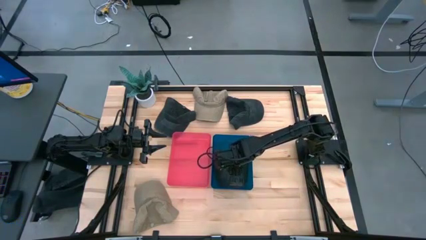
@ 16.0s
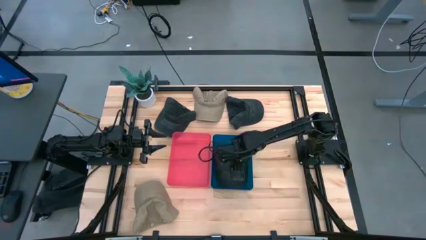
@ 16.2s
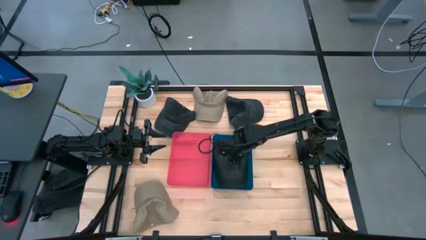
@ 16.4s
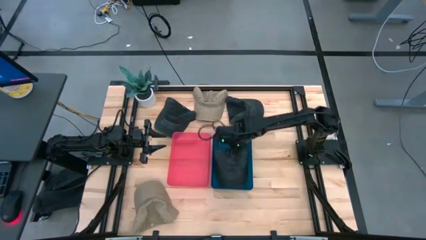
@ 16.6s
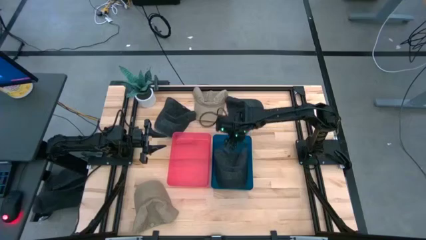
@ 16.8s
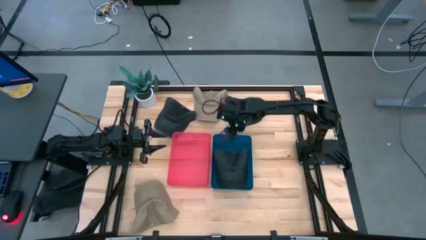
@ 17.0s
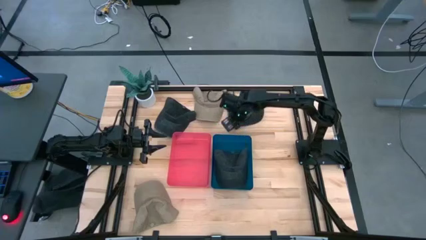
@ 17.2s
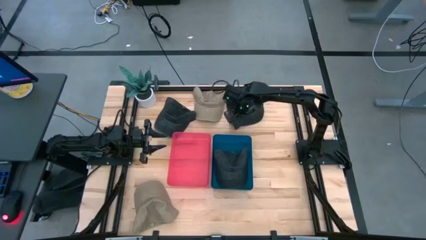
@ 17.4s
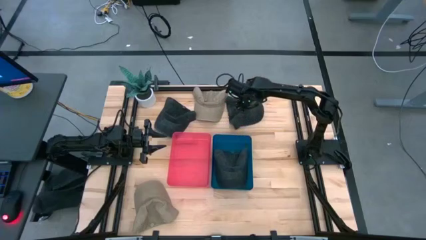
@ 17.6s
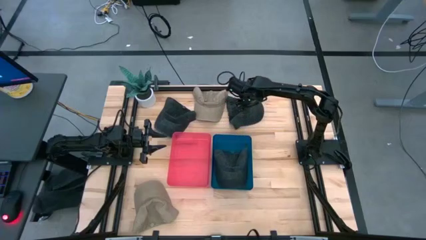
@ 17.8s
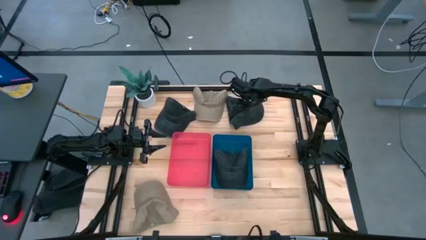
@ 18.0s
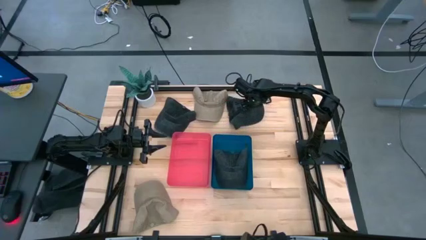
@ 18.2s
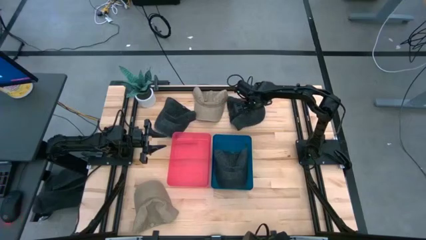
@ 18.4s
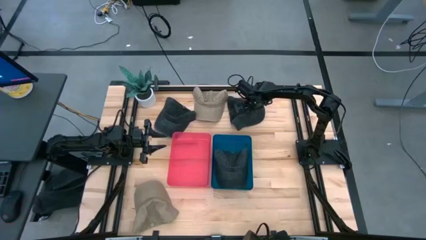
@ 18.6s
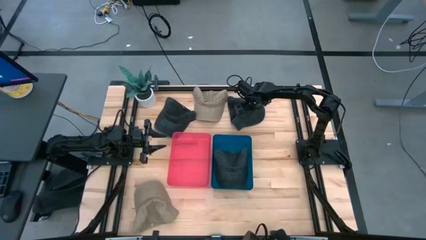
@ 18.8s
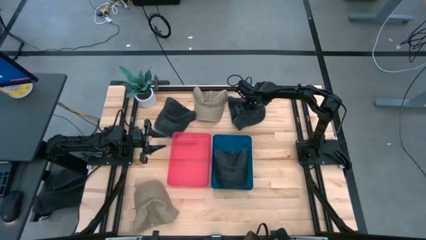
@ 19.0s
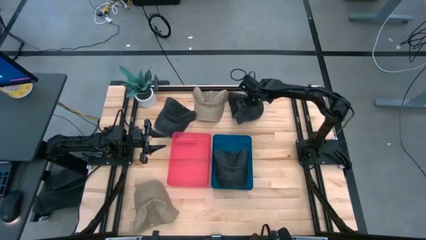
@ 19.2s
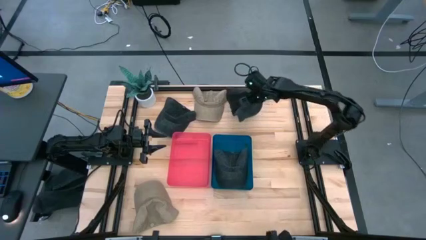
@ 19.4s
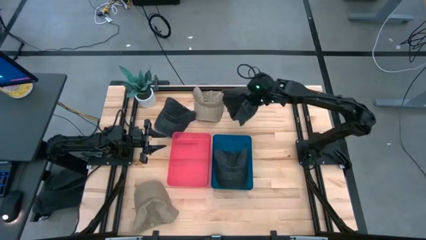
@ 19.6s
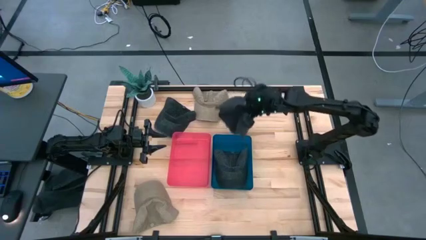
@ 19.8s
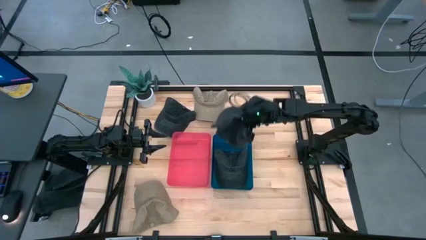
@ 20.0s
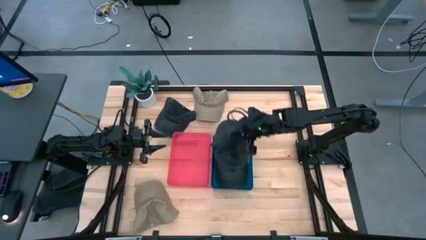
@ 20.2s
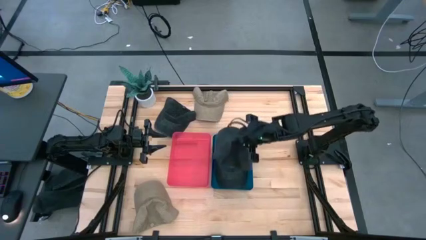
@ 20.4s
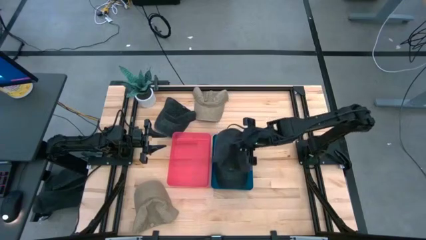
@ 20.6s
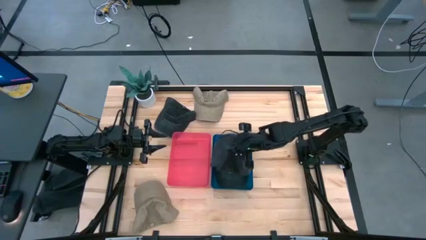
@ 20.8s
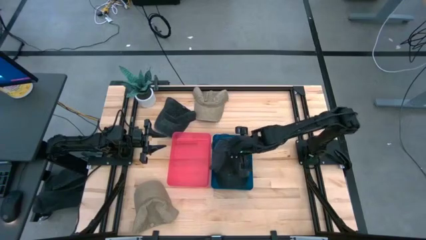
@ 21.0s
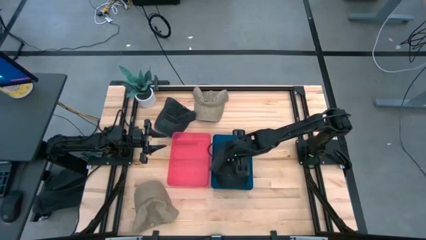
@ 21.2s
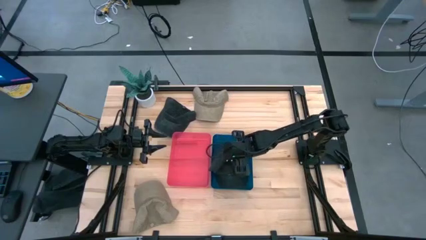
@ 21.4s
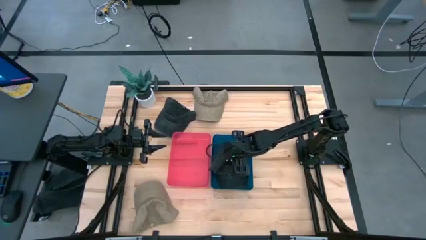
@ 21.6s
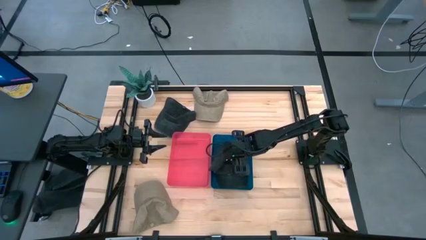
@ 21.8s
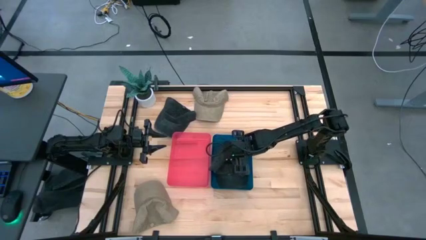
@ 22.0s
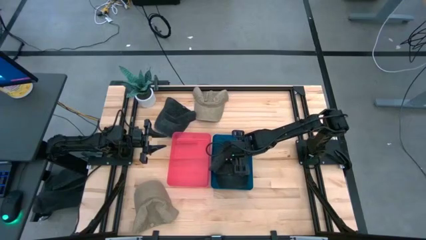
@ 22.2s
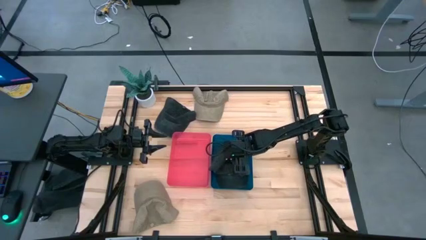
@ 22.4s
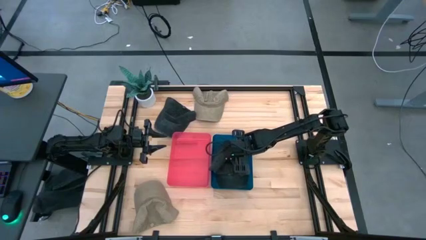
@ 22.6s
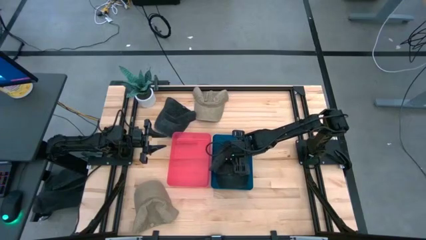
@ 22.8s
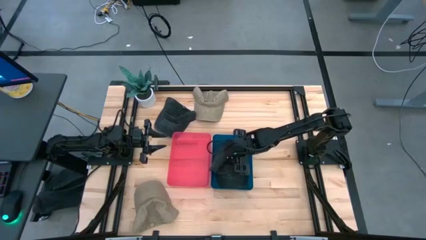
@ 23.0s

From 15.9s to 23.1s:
Task: Pick & Place hat
Put the right black cap into the blue bin

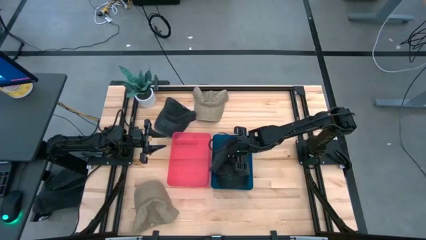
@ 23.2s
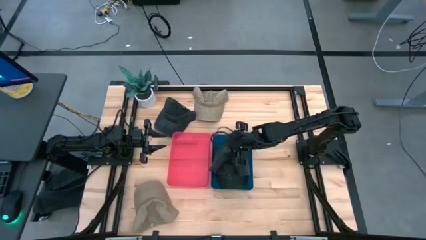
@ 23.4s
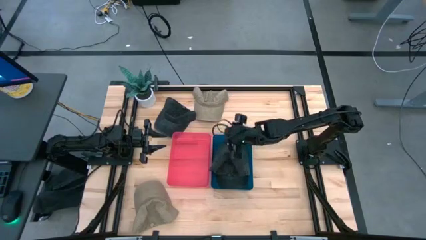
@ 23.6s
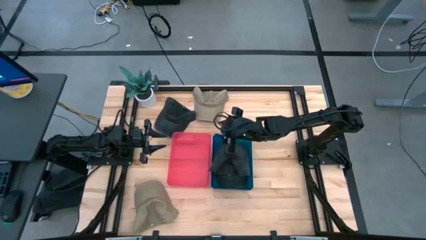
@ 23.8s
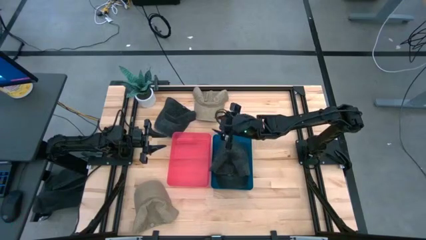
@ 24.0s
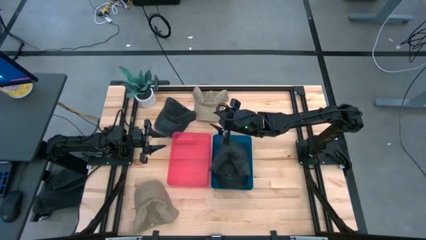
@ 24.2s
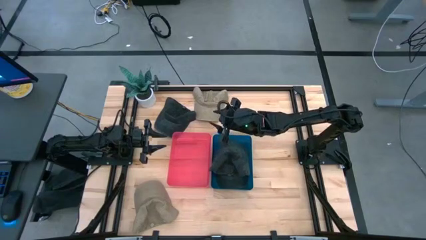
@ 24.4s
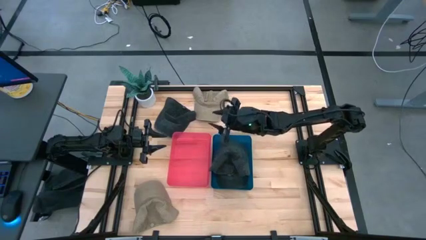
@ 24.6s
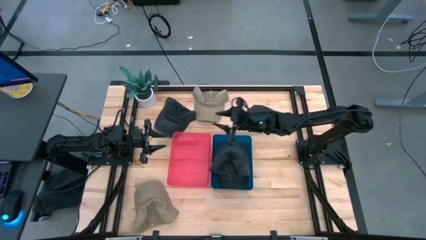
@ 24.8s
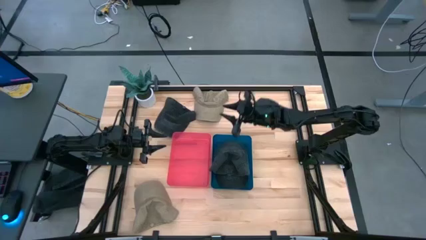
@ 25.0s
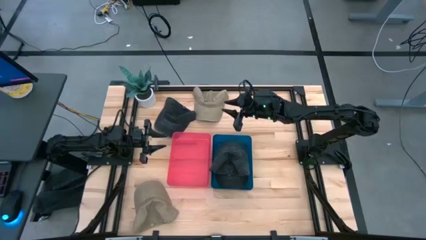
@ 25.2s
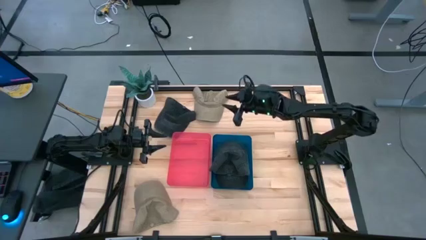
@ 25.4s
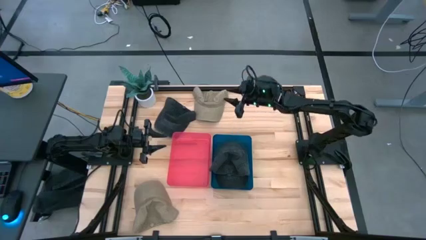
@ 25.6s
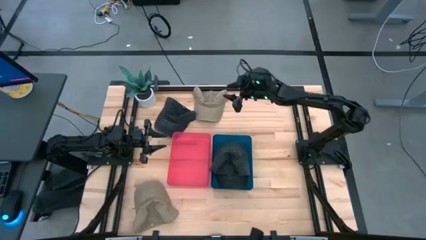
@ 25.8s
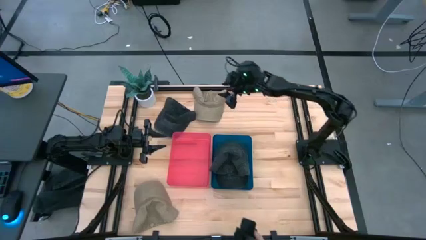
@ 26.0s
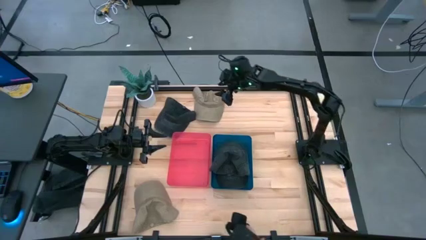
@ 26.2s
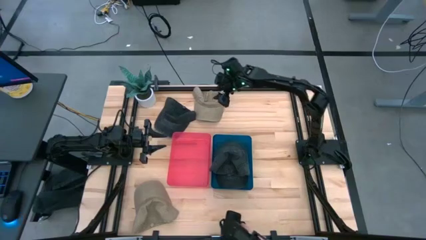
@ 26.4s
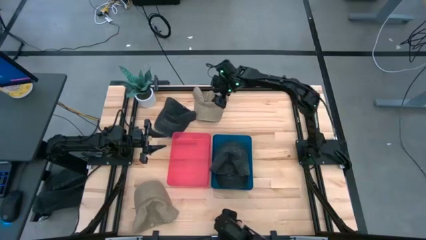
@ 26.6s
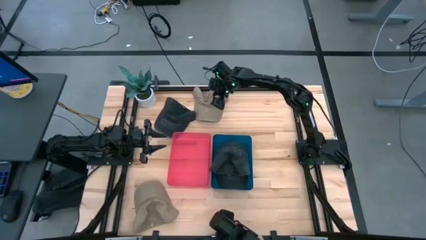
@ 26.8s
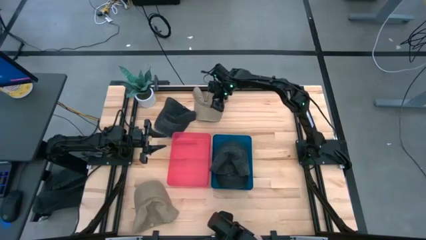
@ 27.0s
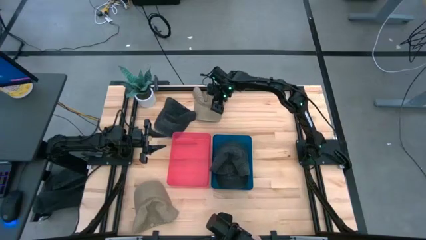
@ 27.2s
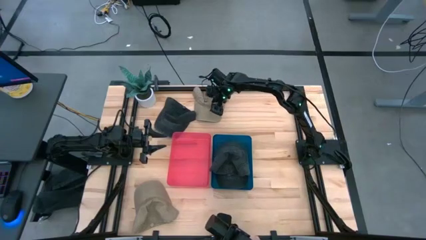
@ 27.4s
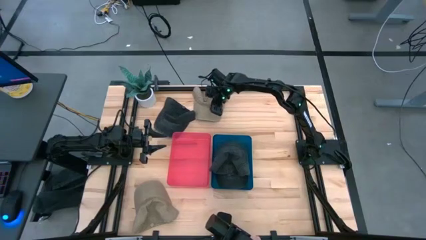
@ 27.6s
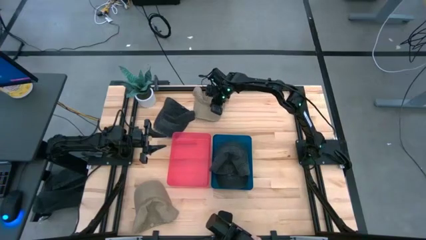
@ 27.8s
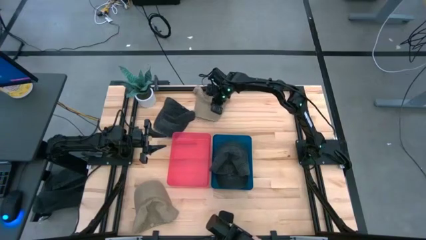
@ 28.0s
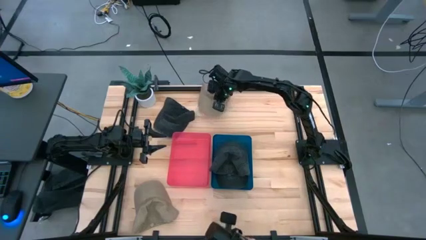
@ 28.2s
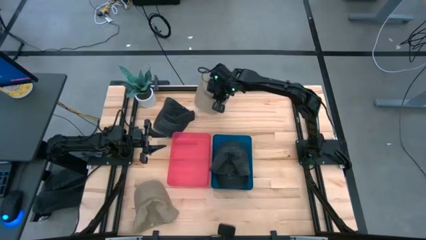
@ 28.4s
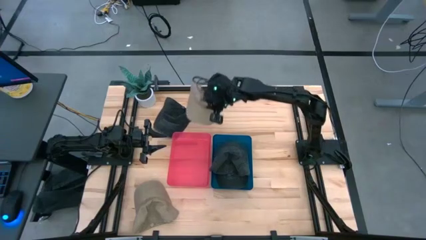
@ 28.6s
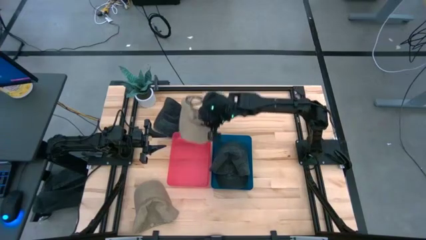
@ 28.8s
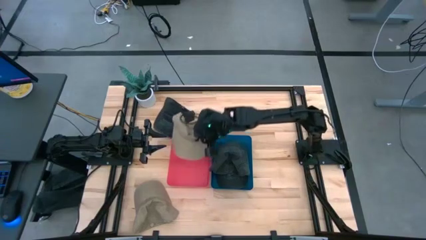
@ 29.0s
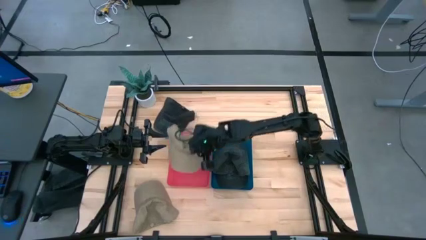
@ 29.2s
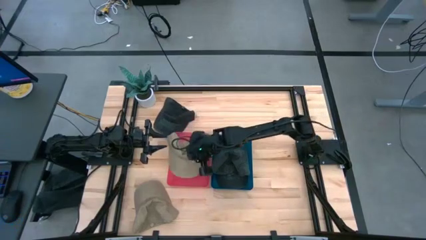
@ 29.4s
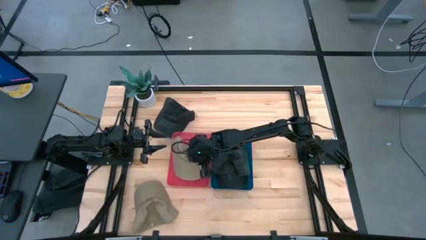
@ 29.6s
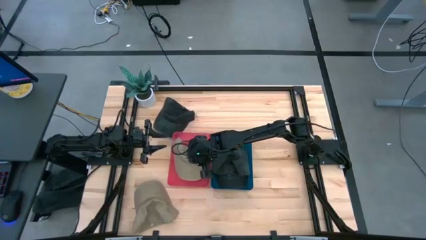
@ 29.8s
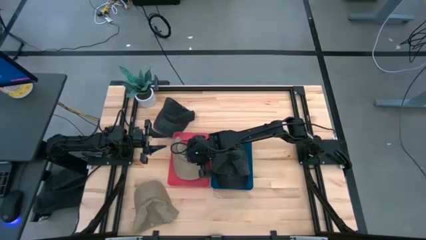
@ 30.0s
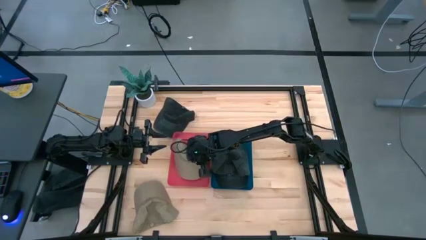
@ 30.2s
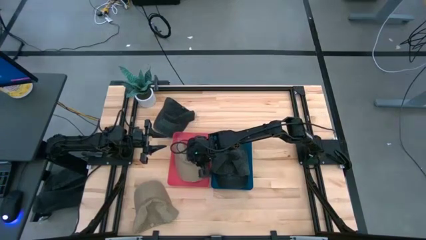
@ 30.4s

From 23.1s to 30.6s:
Put the top brown cap into the red bin

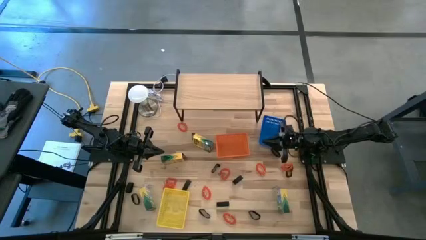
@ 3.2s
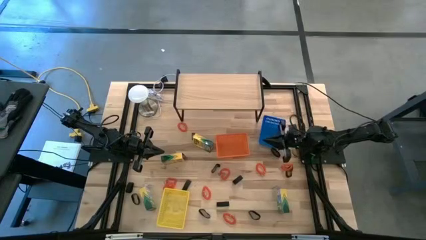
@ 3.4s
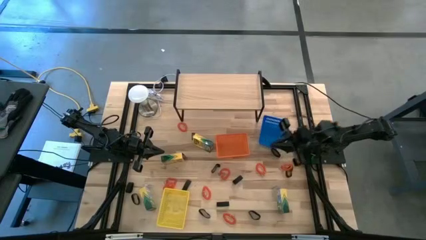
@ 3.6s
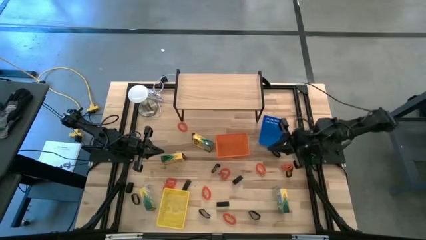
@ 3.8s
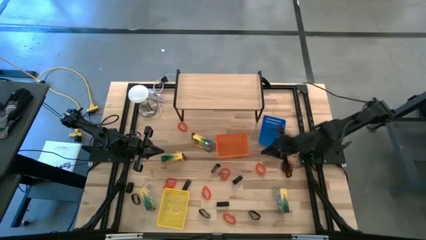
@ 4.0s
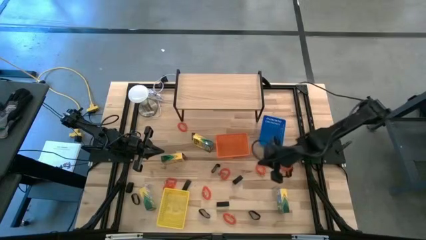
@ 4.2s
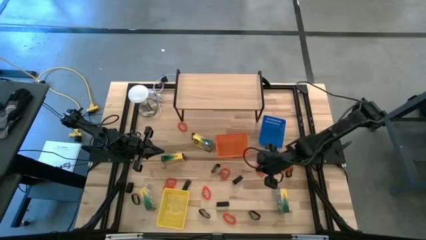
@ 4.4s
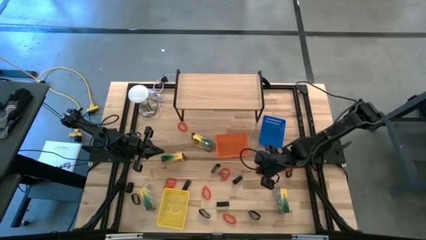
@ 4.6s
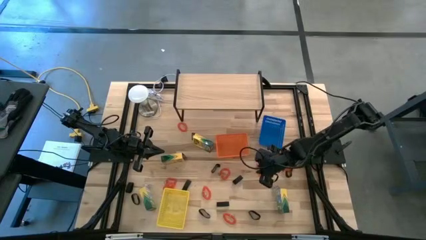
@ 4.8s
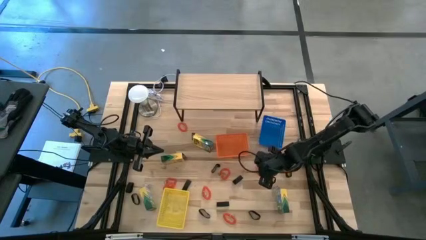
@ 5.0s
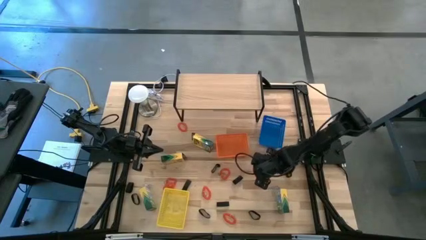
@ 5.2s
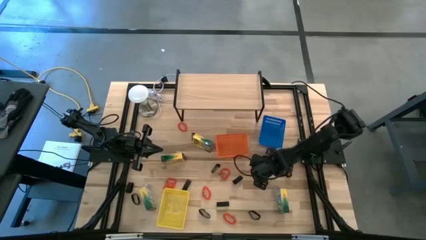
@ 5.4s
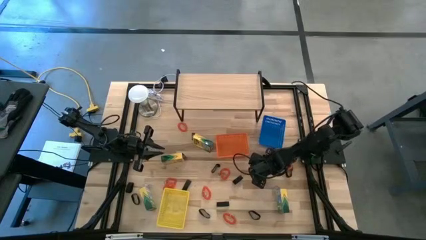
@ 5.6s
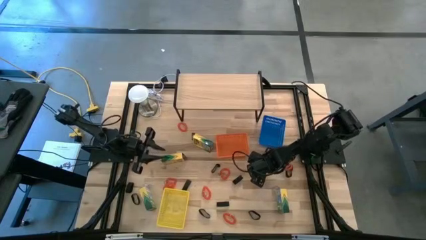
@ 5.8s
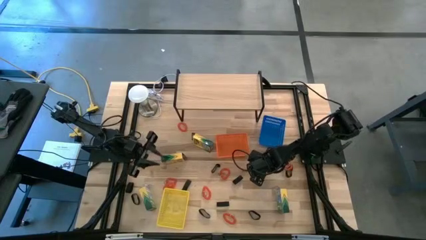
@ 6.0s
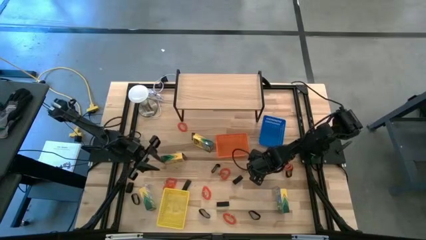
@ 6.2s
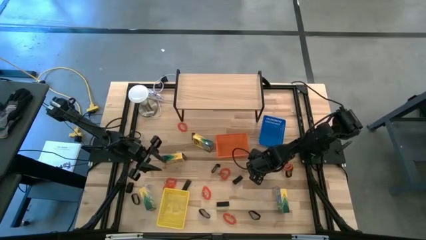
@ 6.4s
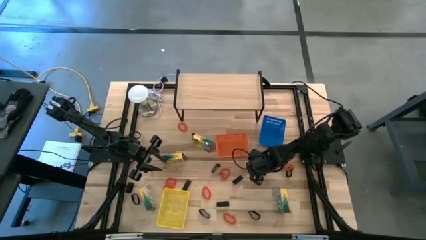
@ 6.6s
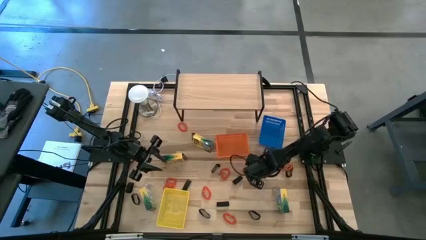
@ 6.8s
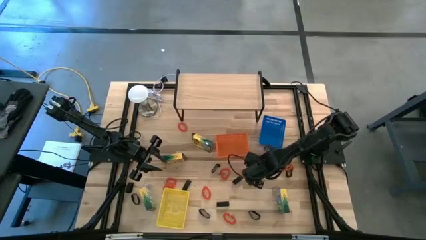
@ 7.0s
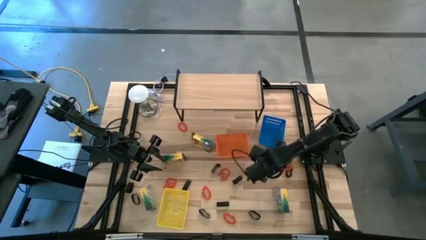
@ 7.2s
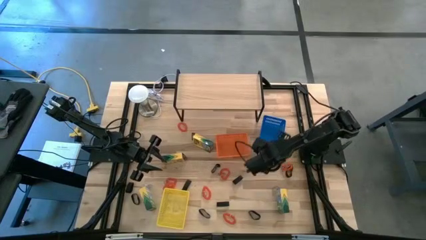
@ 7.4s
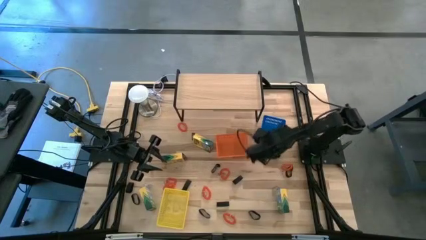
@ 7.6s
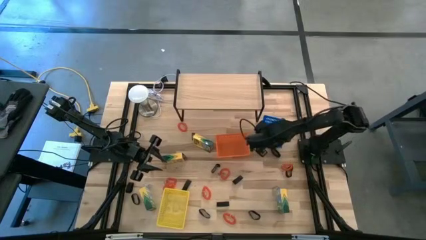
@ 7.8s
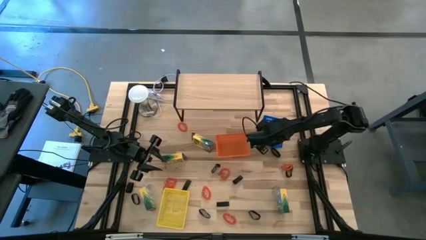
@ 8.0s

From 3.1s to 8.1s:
Task: Pick & Place Office Desk Supplies
Put the spring keychain into the blue bin
